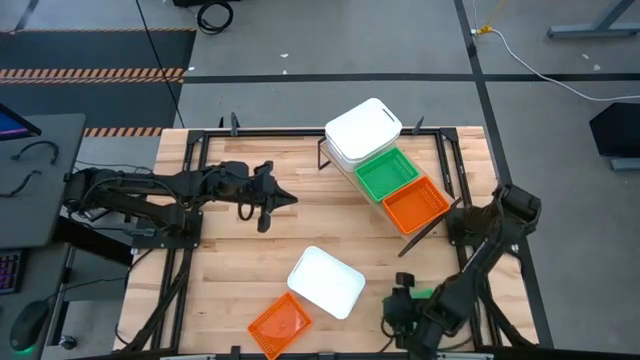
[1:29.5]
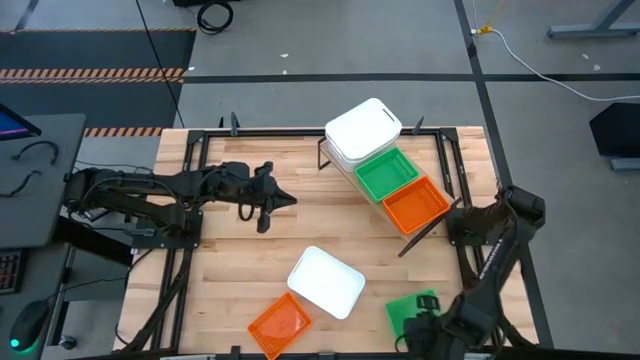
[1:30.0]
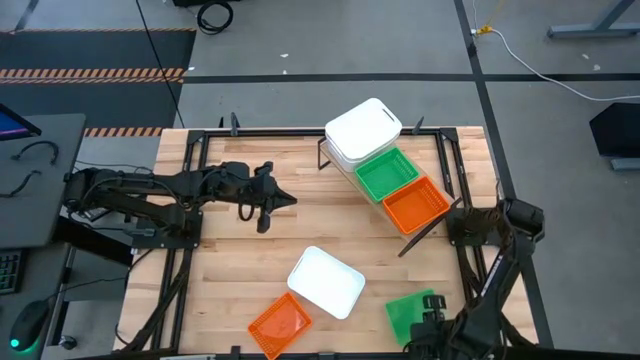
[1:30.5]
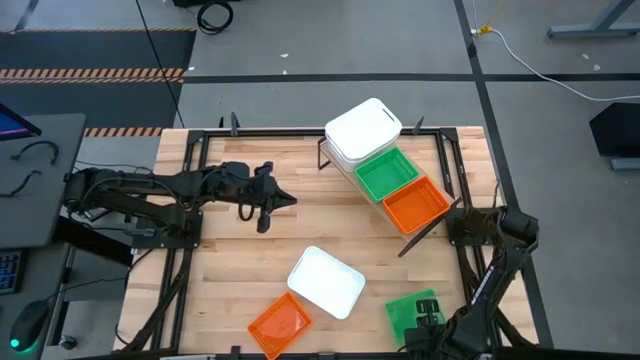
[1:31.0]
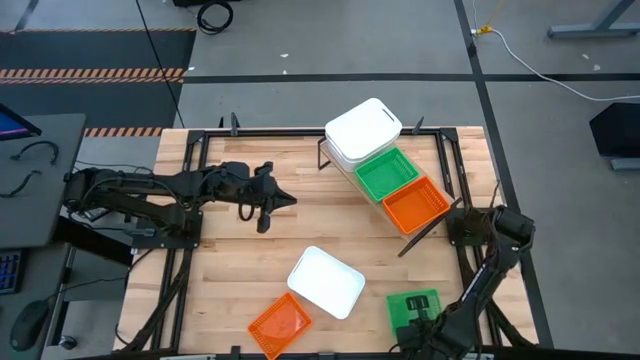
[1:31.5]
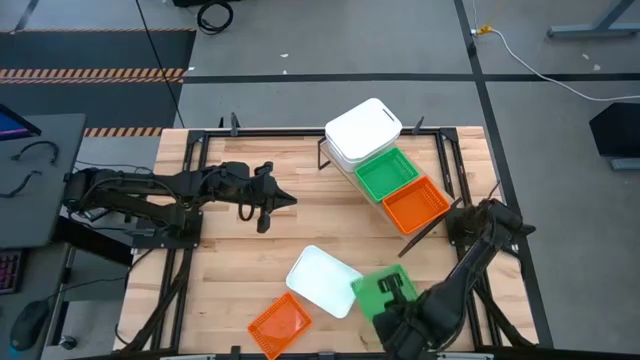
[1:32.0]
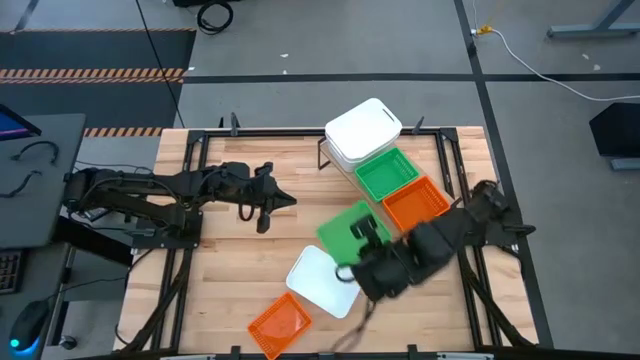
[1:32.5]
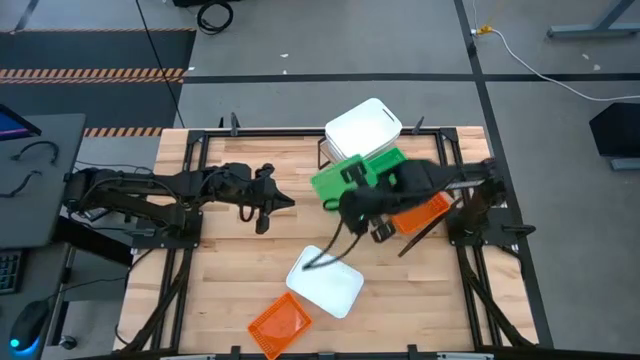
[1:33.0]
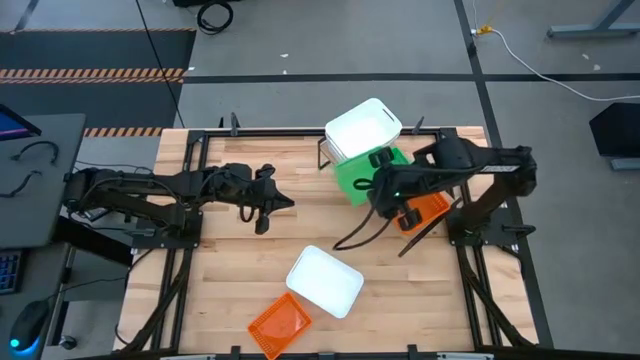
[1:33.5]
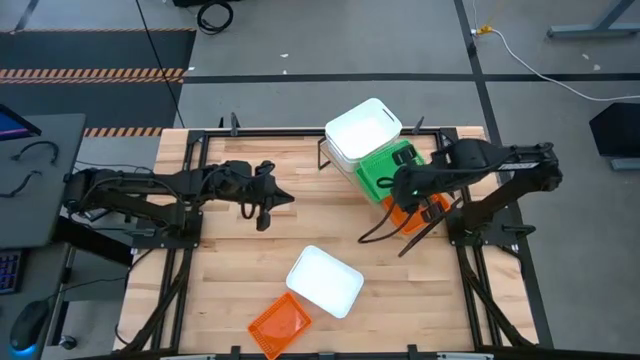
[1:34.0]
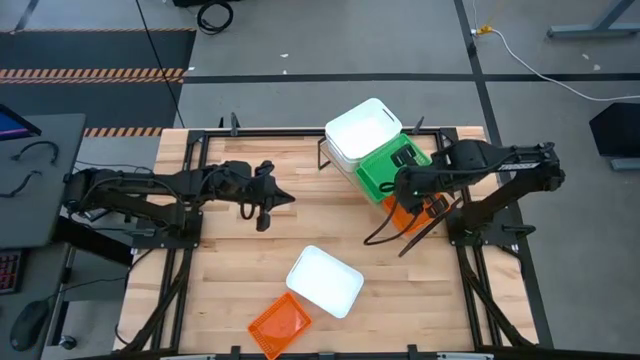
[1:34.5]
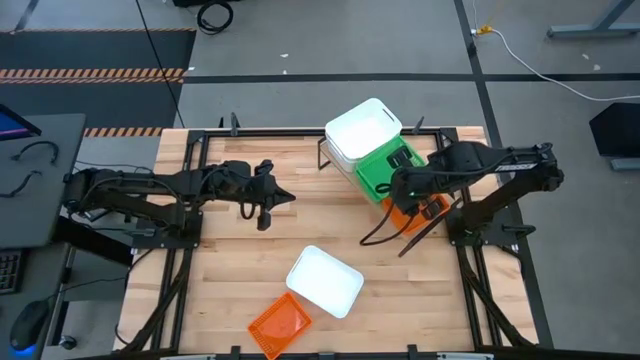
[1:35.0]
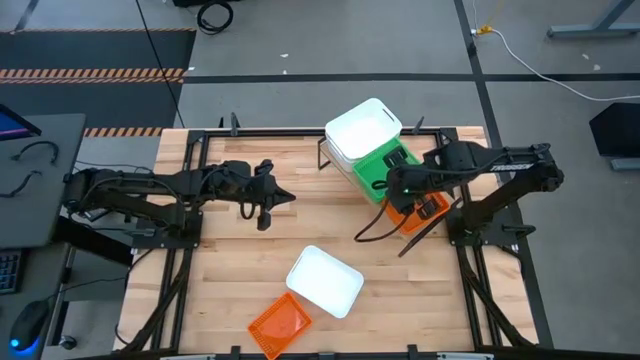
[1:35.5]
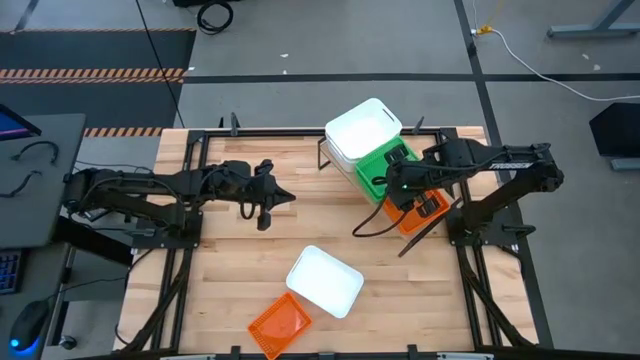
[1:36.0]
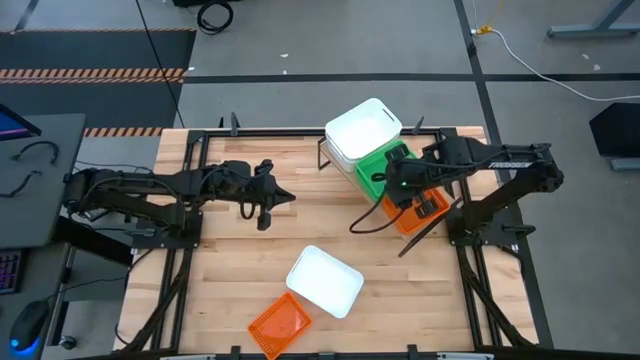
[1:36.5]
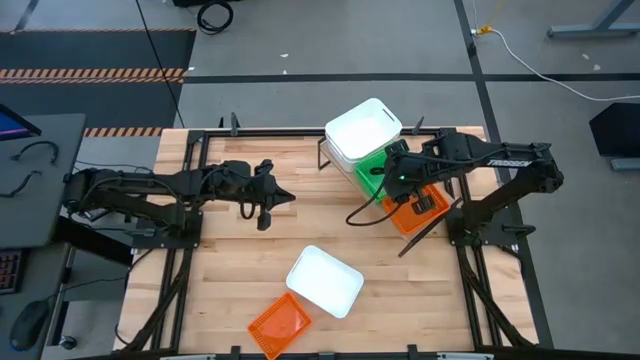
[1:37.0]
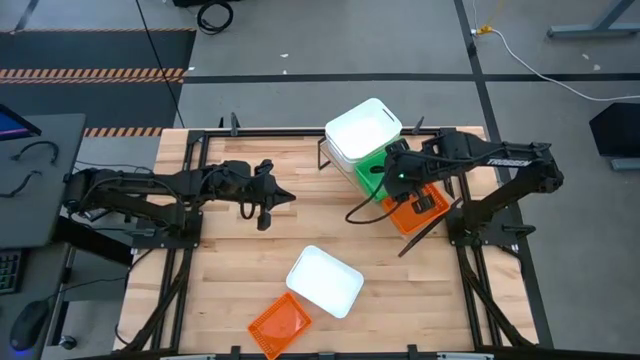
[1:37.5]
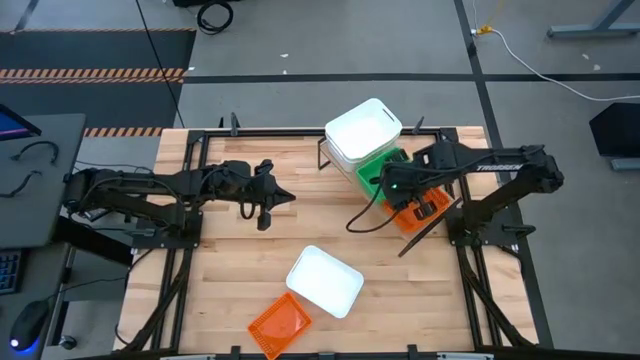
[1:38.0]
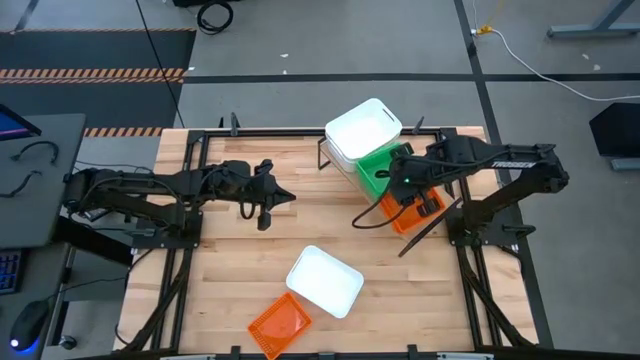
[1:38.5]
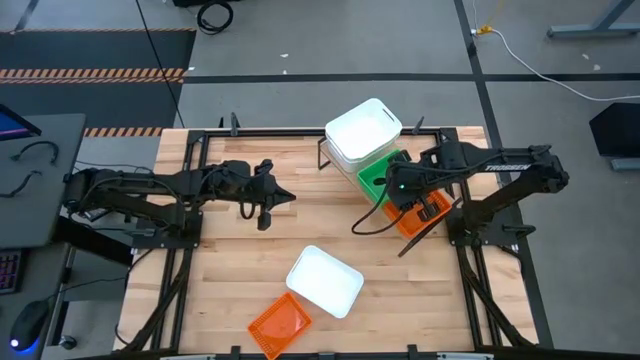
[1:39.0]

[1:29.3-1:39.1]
Task: Stack baskets on shelf by color
Stack the green bin on top of the green bin on the shelf

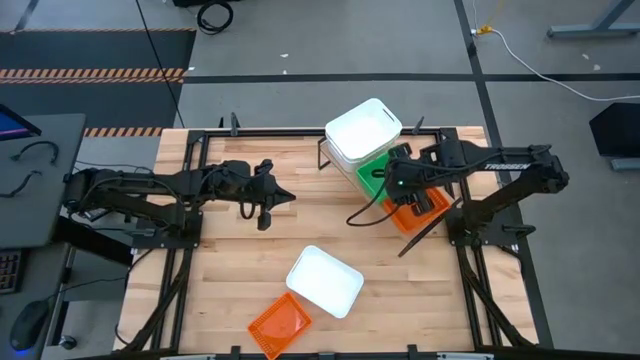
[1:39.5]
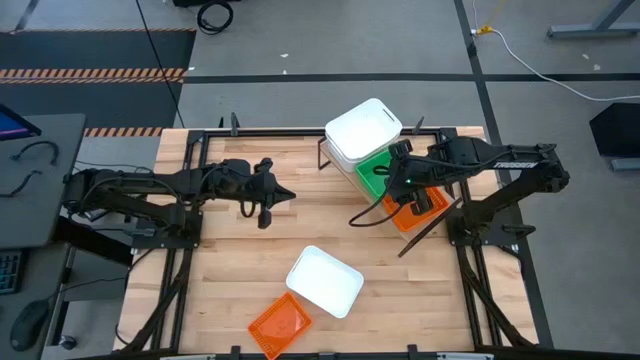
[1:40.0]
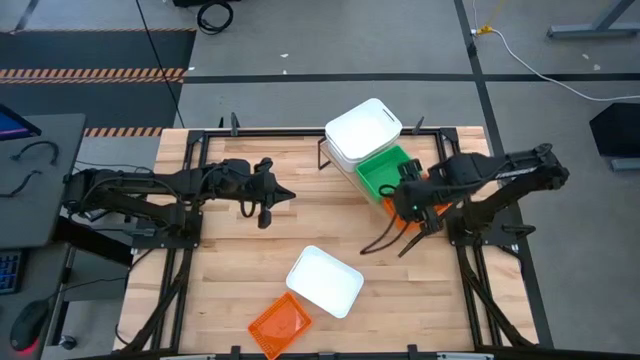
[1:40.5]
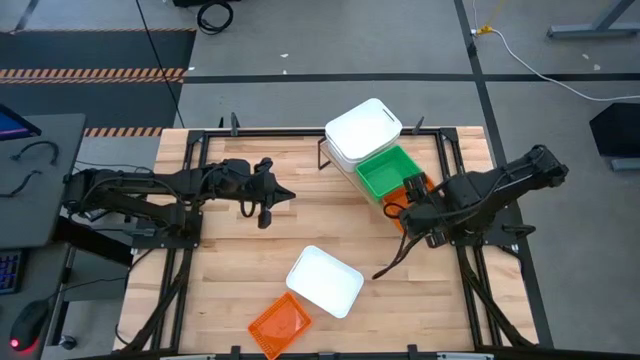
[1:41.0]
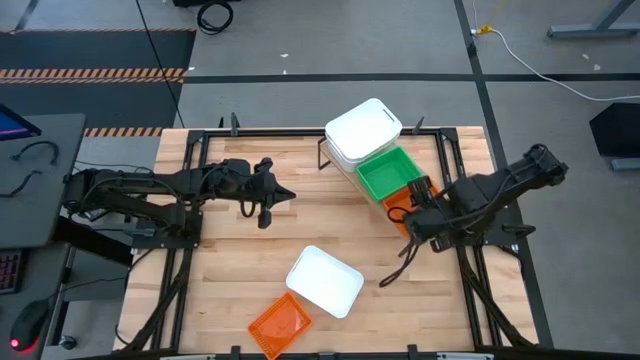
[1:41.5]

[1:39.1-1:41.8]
Adjust the stacked of orange bins

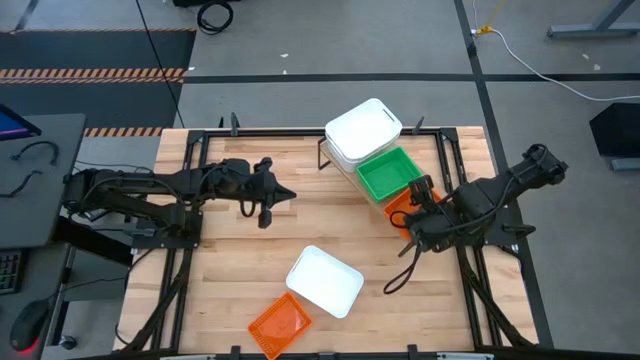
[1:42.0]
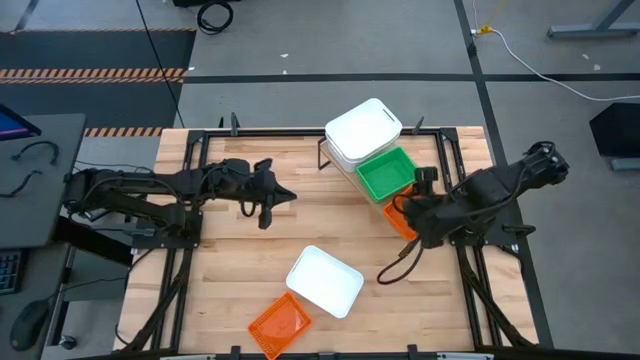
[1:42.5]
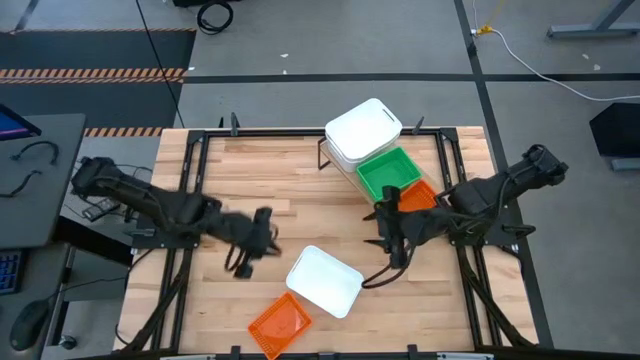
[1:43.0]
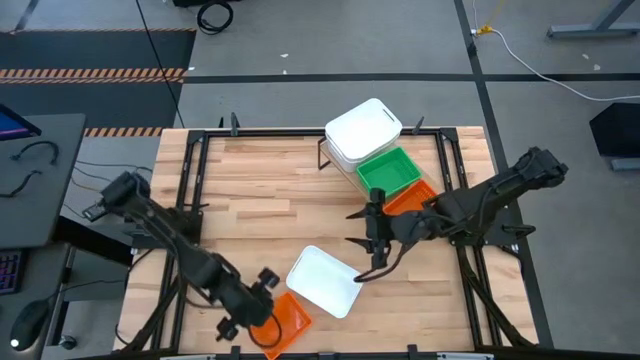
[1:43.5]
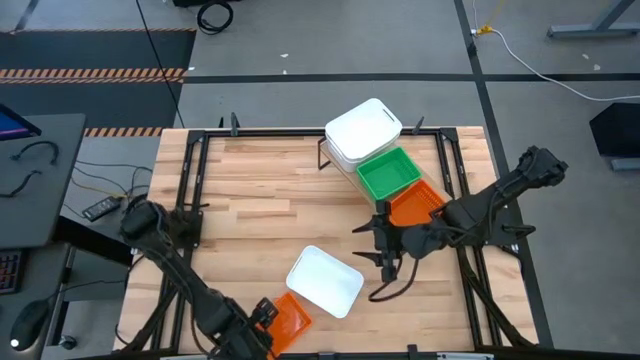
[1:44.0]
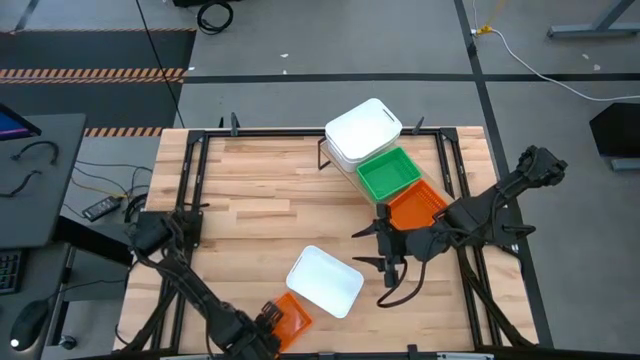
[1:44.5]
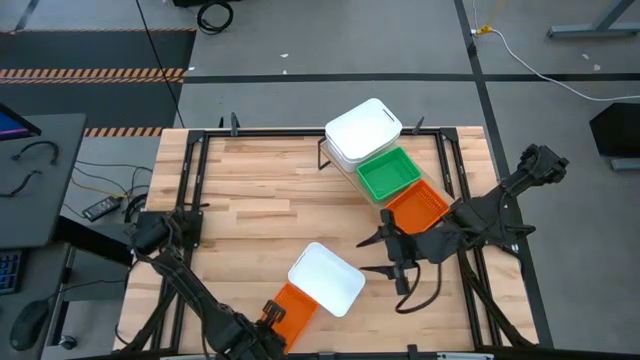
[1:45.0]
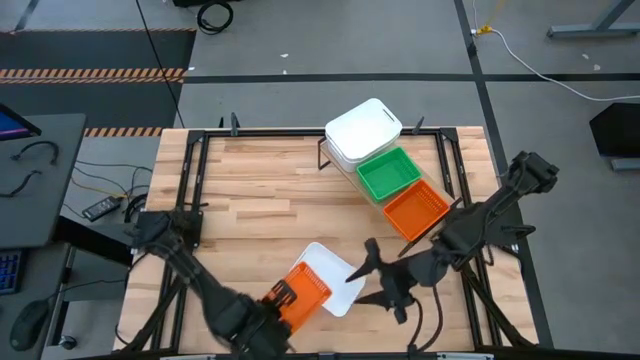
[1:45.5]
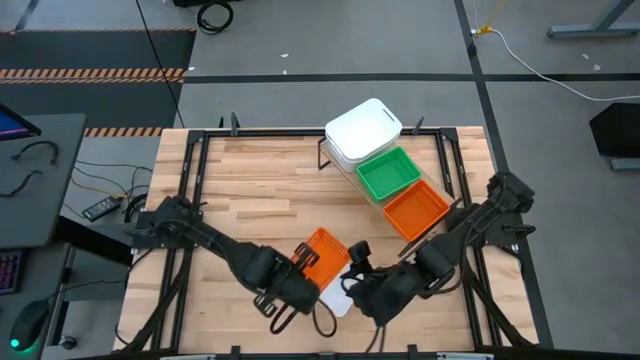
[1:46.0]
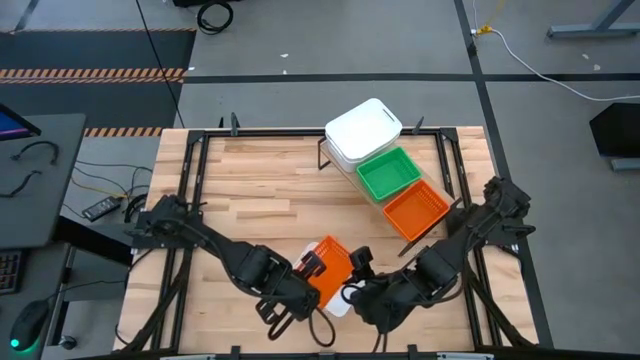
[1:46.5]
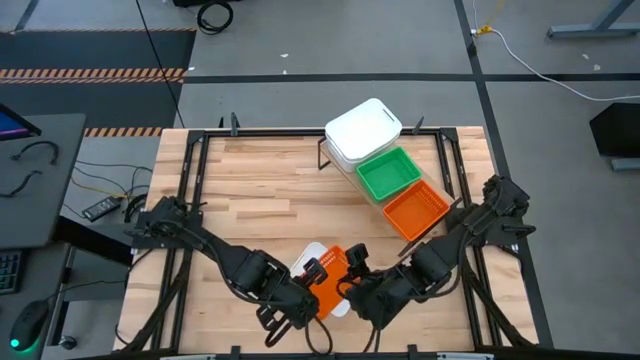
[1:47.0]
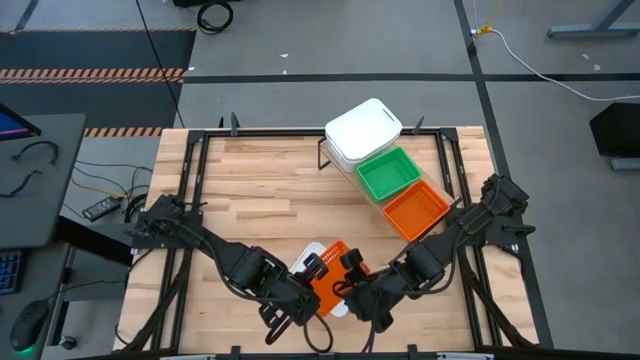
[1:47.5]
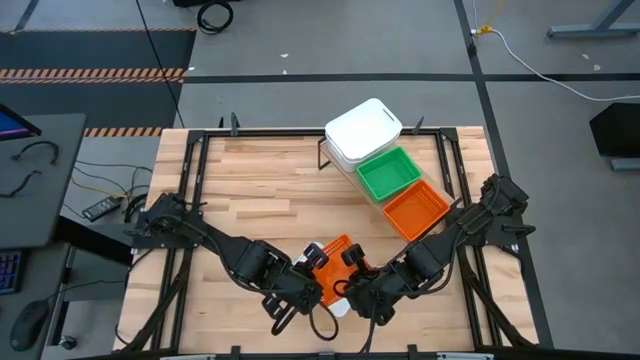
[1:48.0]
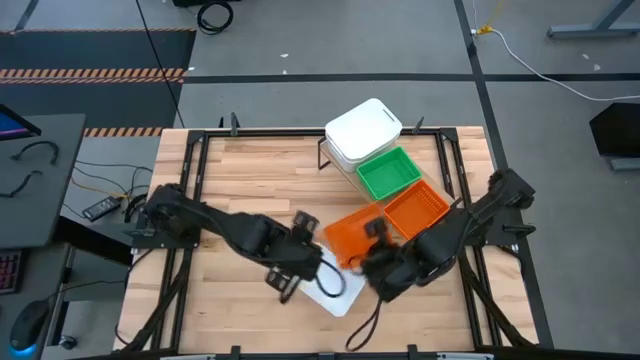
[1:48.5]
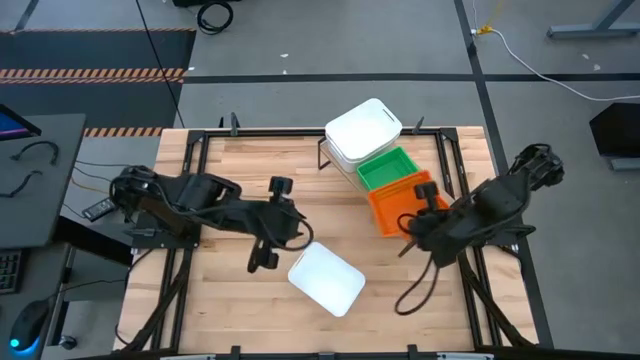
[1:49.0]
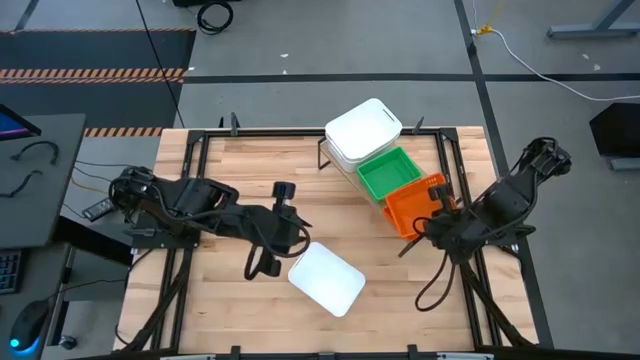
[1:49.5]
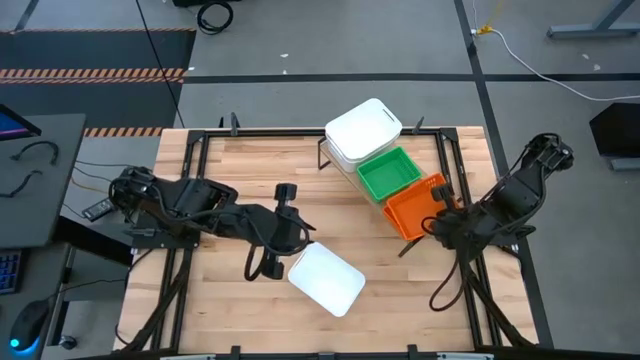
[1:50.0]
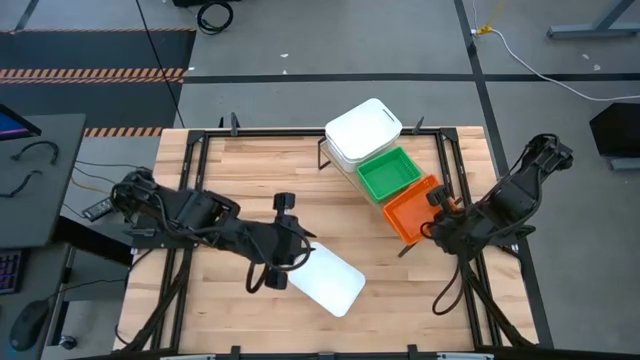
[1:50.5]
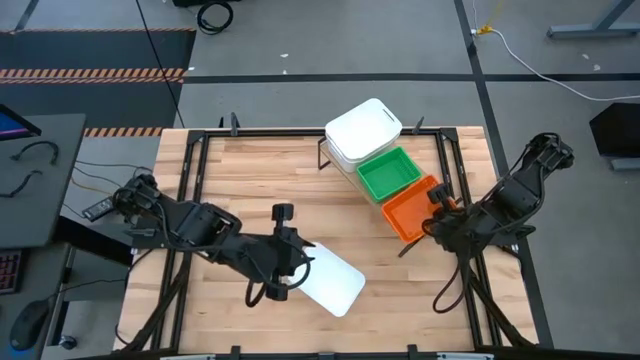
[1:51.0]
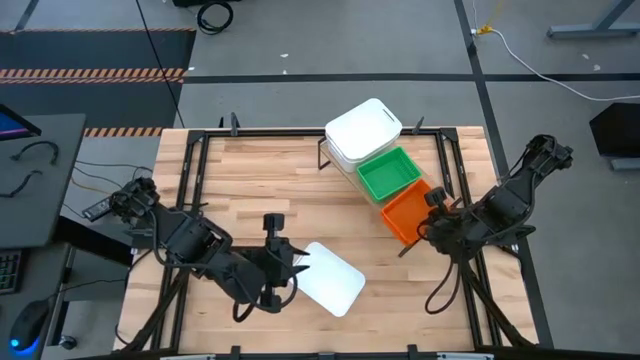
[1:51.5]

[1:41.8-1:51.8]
Stack the orange bin on top of the orange bin on the shelf
